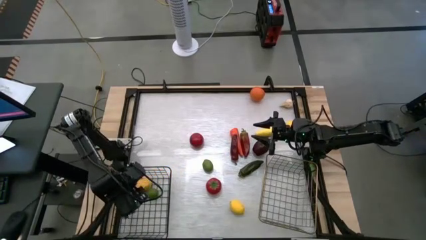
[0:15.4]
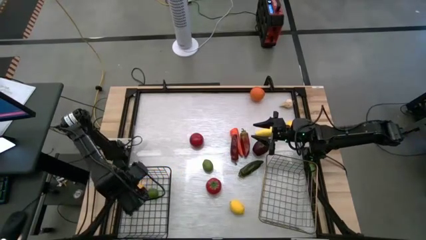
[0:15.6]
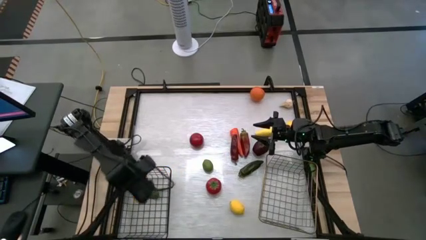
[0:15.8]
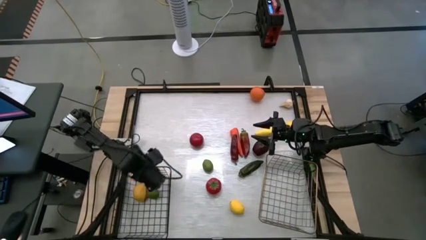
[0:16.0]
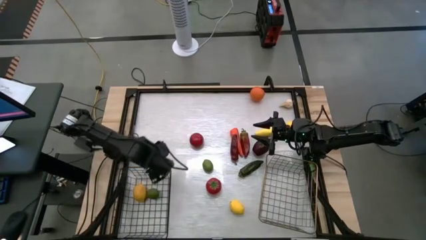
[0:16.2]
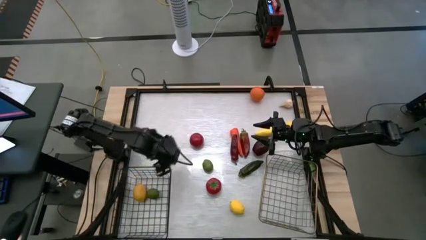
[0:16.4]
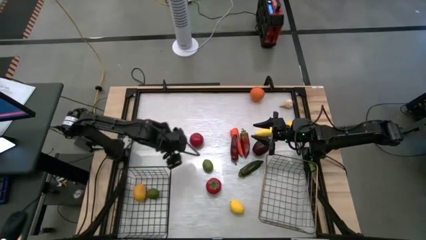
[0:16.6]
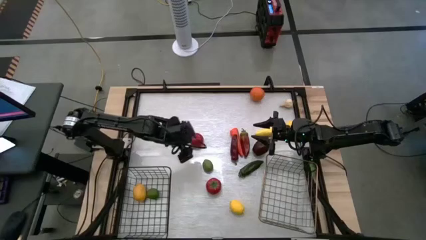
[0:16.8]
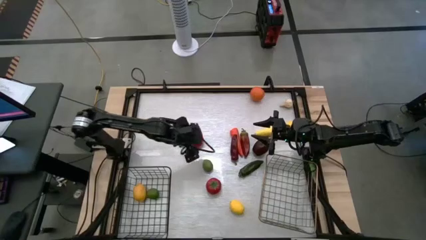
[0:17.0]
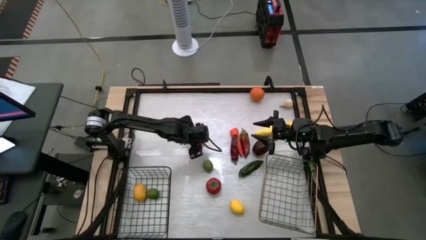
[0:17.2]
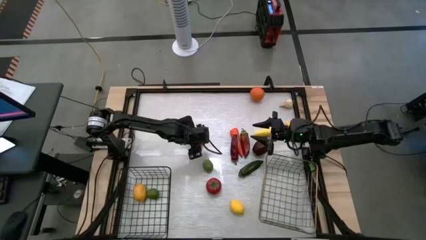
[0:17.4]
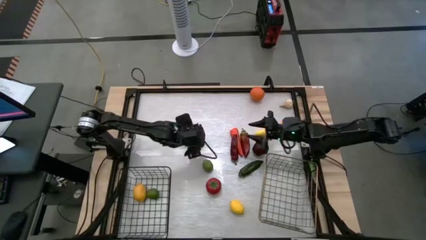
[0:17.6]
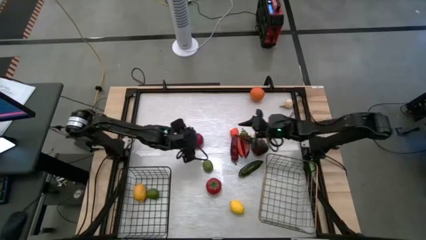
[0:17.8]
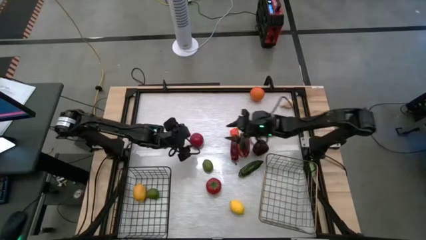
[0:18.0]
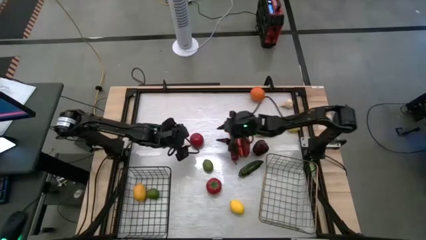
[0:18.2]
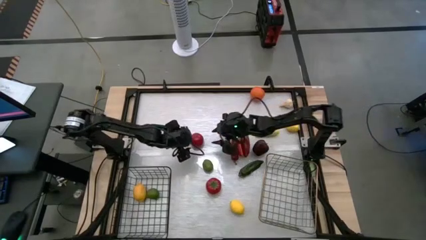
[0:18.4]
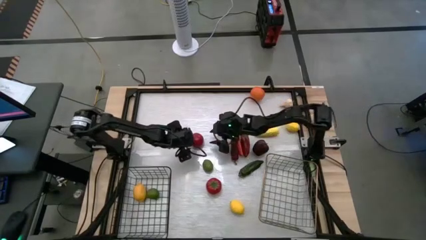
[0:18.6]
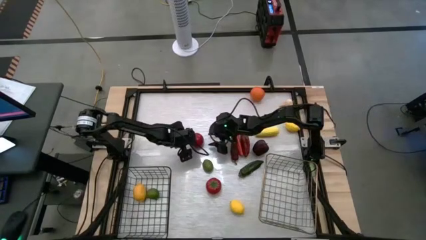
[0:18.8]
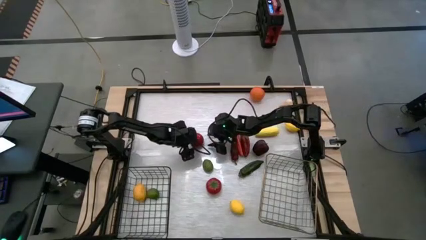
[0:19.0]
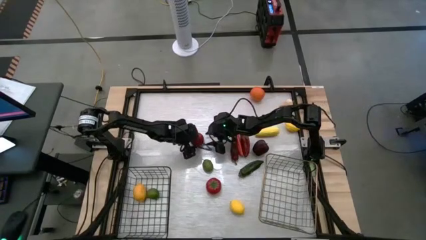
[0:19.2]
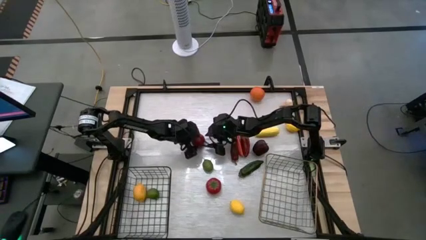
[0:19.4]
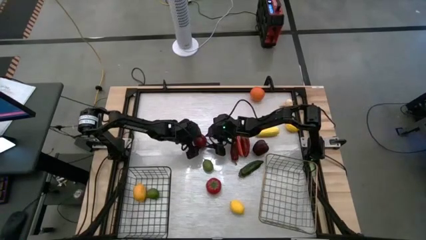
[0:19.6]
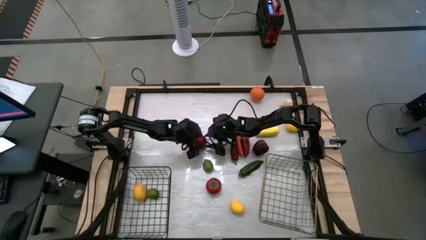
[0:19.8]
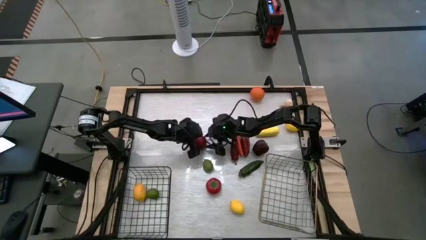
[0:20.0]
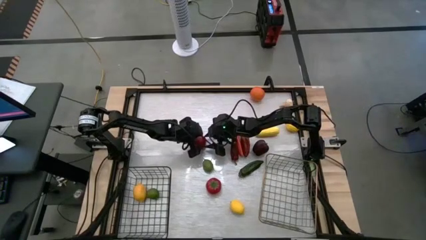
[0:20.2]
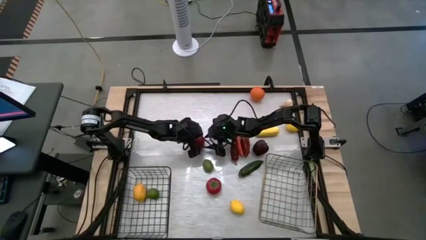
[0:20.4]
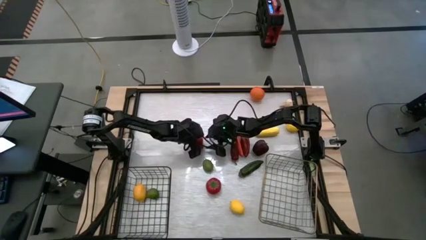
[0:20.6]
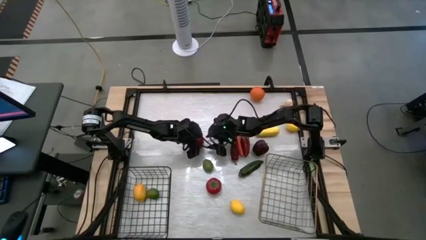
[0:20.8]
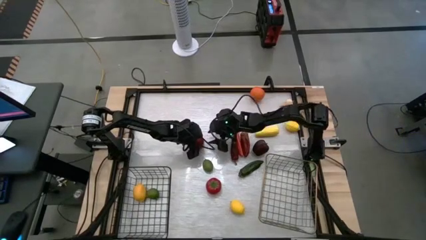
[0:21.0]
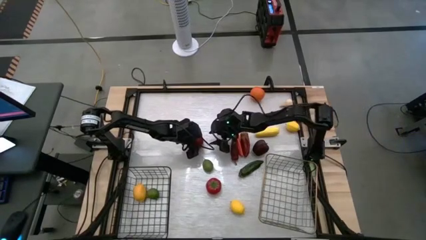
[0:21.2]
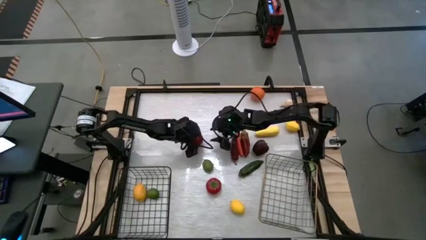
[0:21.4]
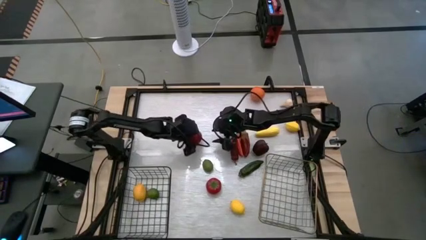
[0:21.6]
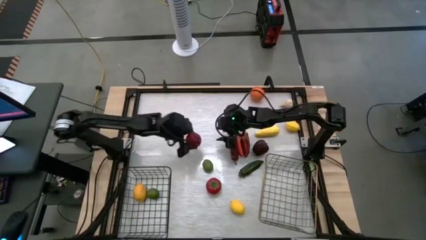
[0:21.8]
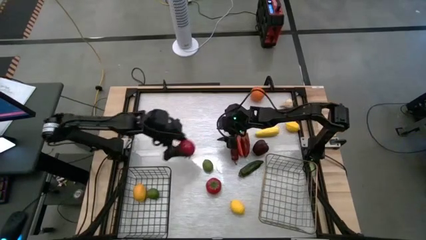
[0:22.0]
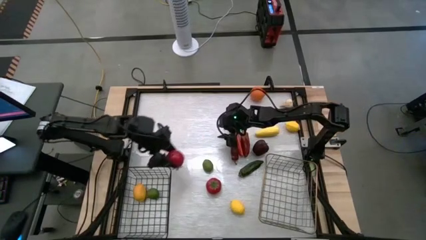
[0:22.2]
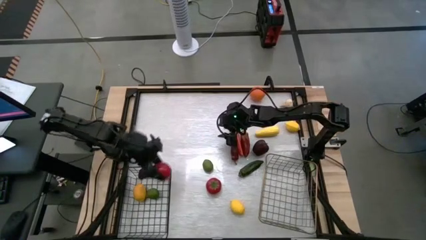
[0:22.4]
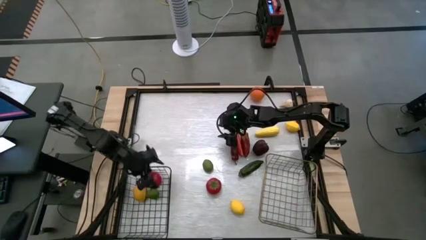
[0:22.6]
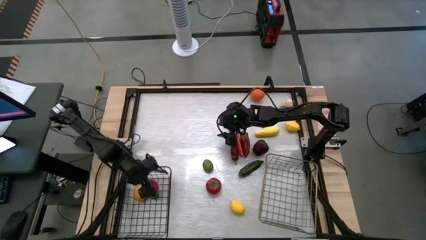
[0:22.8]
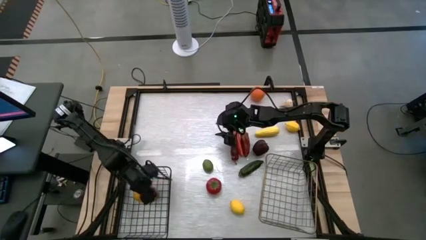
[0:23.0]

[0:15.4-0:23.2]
Task: Sort produce into baskets
Put the top red tomato into the black wire basket

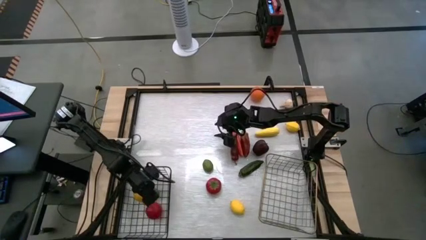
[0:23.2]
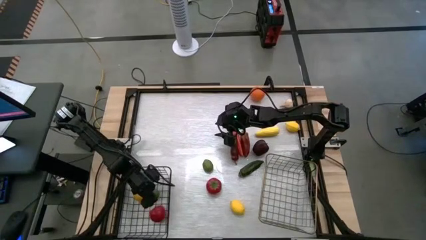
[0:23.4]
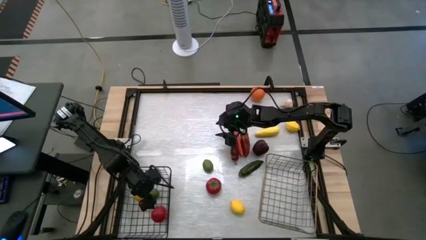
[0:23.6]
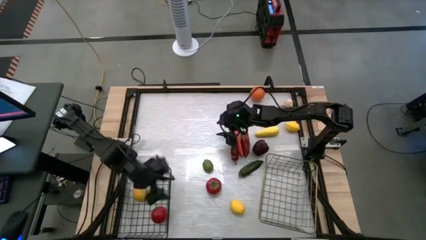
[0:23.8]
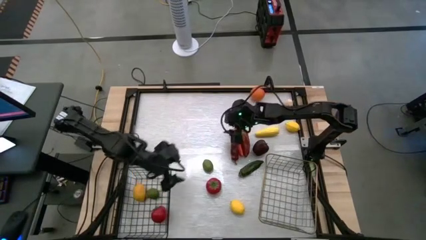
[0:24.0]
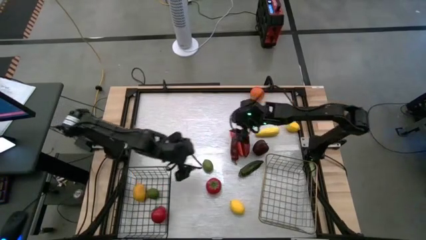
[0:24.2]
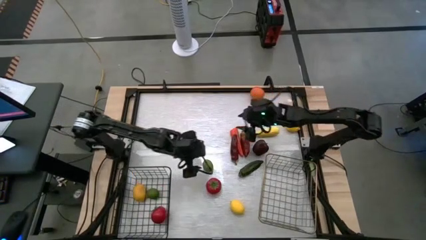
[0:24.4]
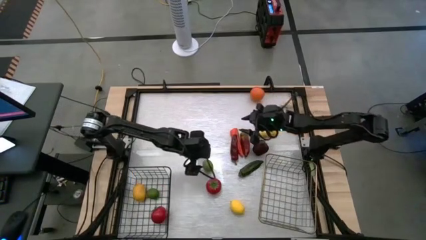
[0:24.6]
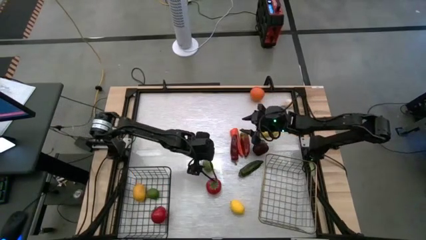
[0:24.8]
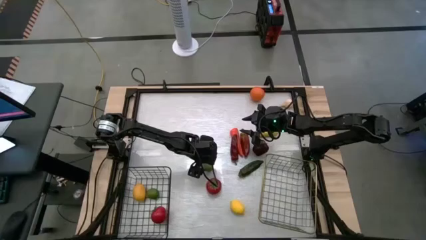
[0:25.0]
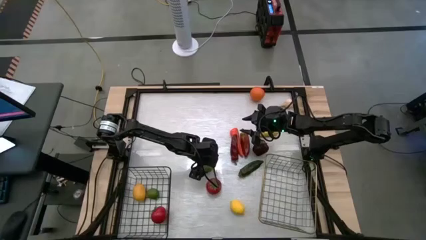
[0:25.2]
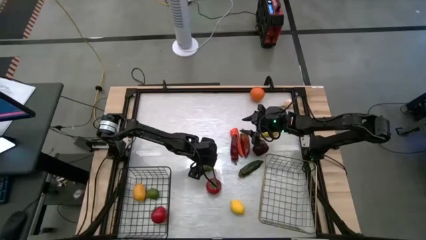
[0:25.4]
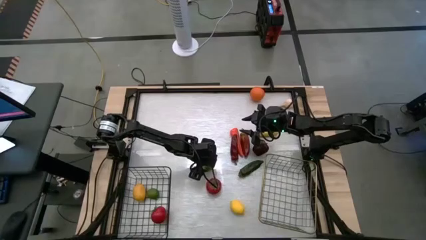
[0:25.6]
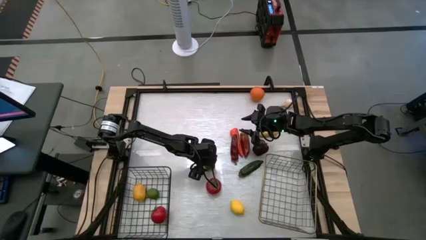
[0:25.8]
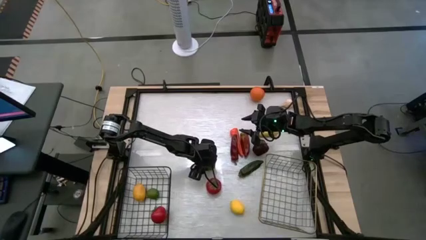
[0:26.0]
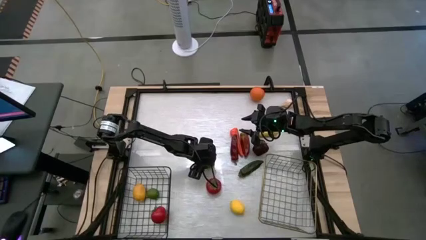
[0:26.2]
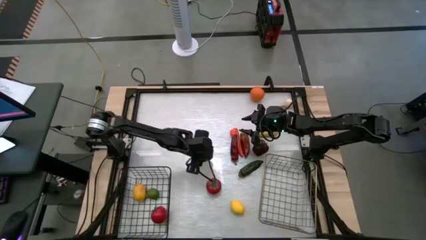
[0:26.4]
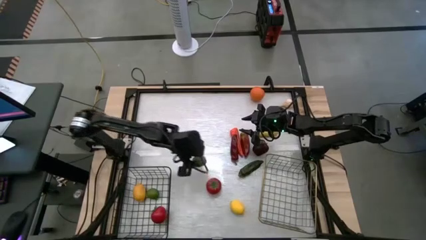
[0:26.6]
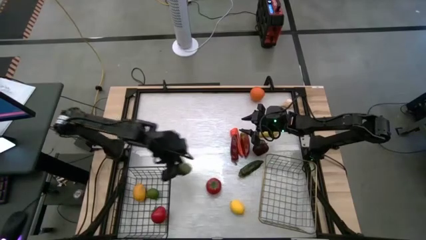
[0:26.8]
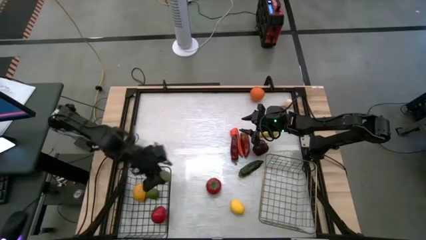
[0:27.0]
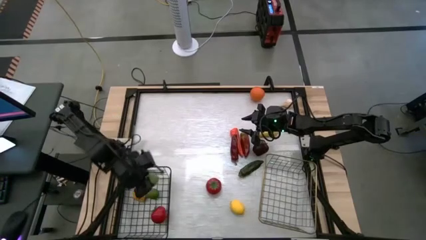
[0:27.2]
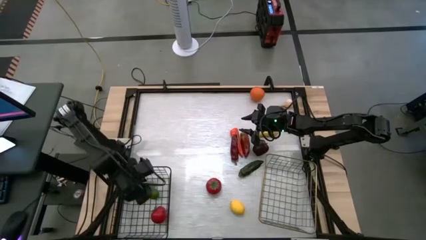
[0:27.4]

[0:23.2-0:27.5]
Put the green lime into the black wire basket

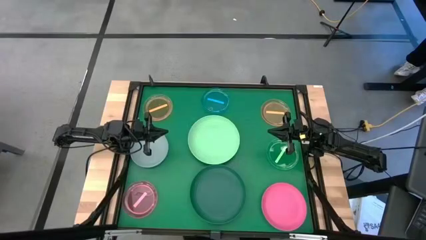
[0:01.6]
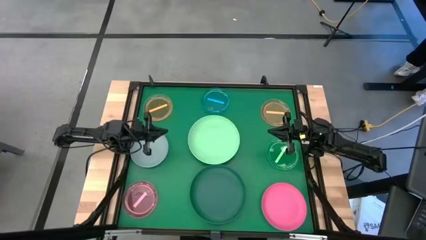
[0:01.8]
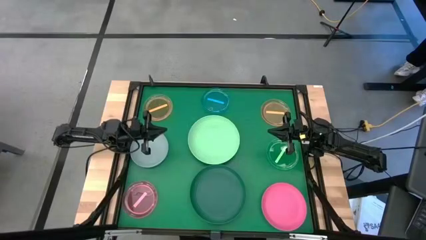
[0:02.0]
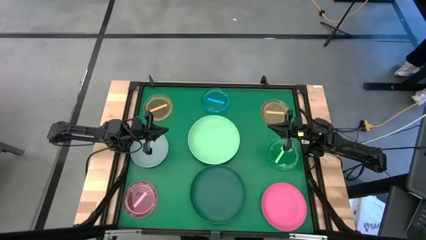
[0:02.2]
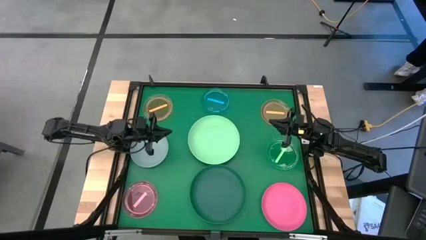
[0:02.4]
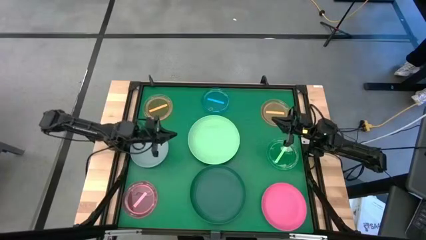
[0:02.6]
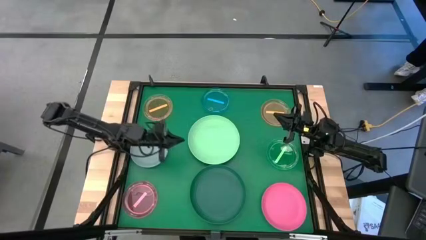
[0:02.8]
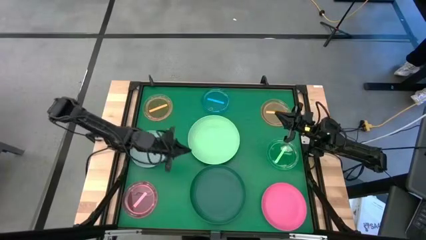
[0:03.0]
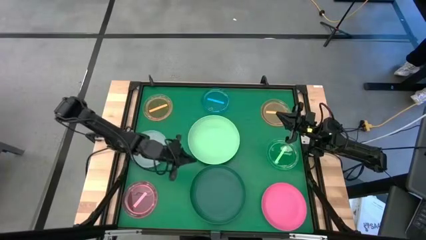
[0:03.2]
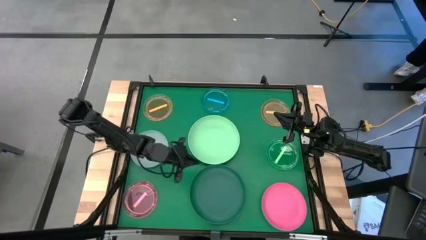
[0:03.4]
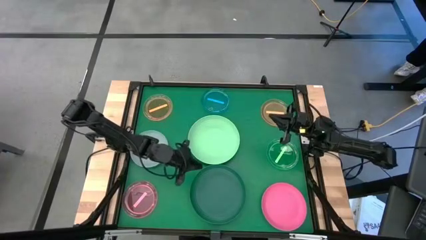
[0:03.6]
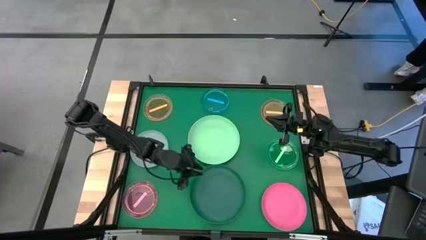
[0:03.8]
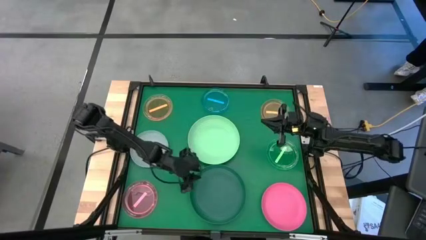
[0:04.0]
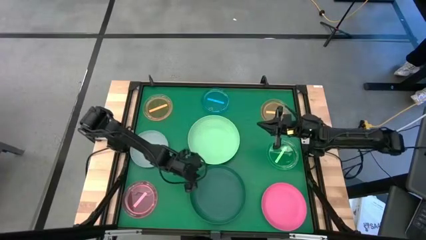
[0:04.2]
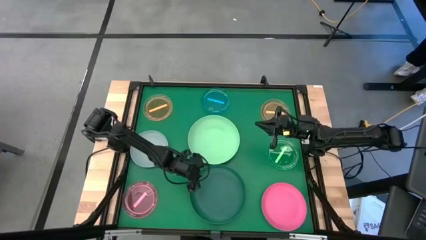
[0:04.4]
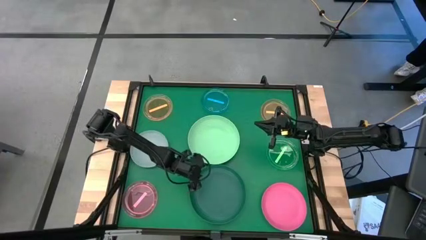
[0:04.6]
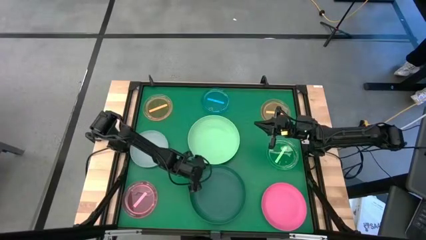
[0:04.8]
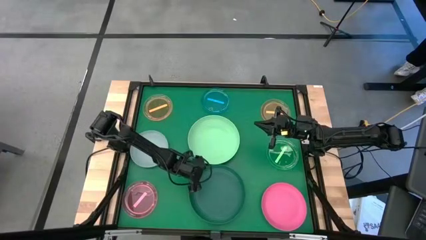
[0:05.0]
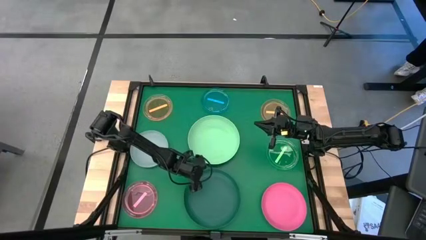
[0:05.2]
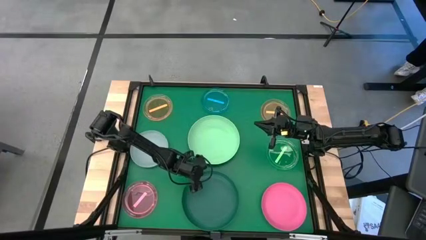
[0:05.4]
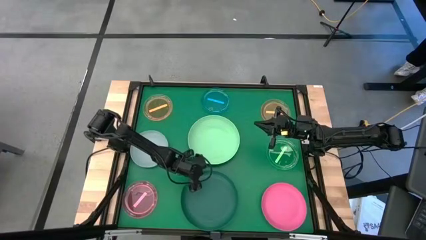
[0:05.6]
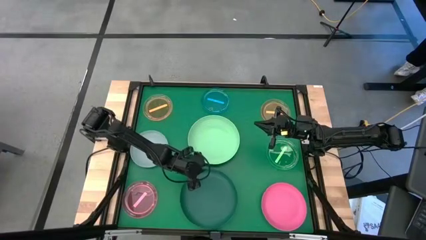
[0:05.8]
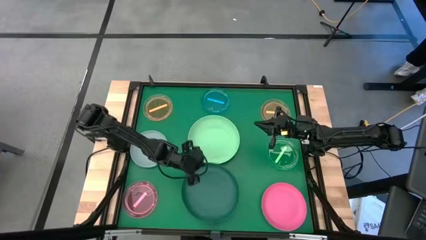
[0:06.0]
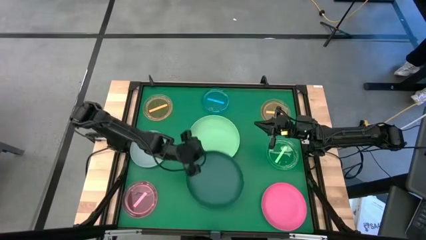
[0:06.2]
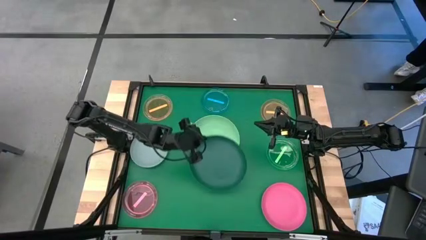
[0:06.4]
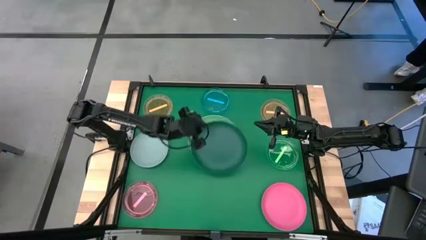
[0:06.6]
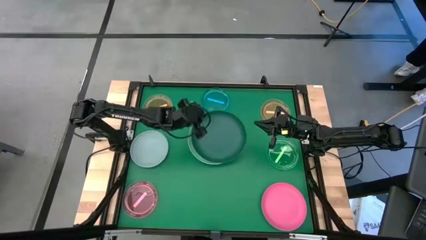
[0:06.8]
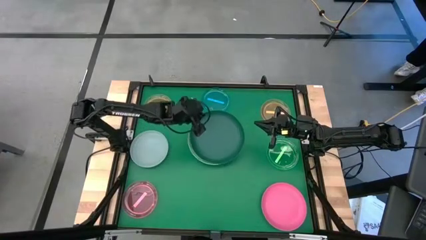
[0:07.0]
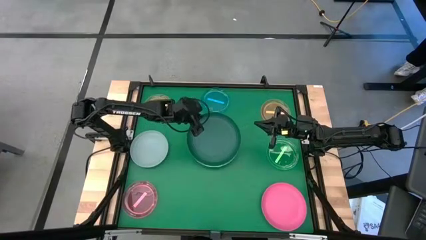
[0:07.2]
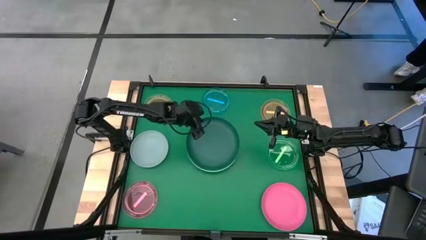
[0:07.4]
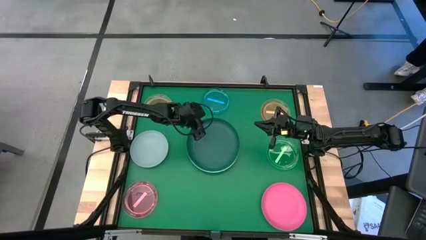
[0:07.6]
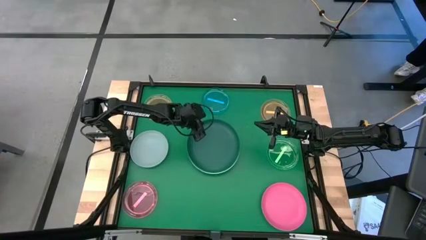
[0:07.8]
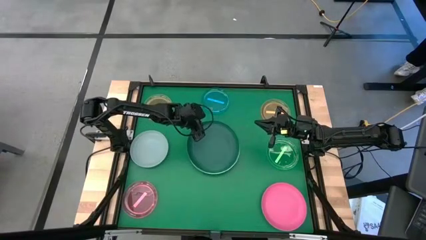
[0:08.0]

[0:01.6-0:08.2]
Task: Stack plastic plates
Stack the green plate on top of the light green plate
